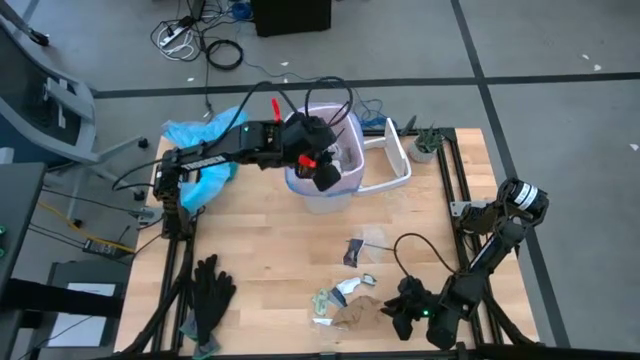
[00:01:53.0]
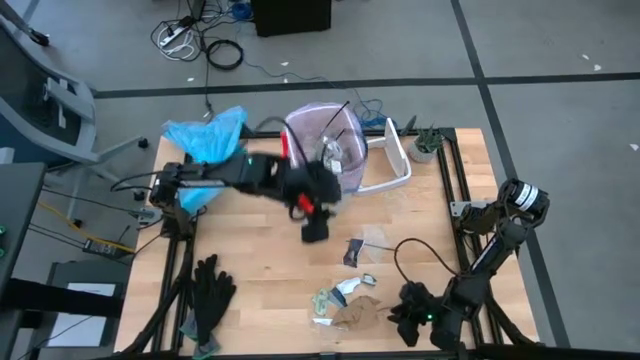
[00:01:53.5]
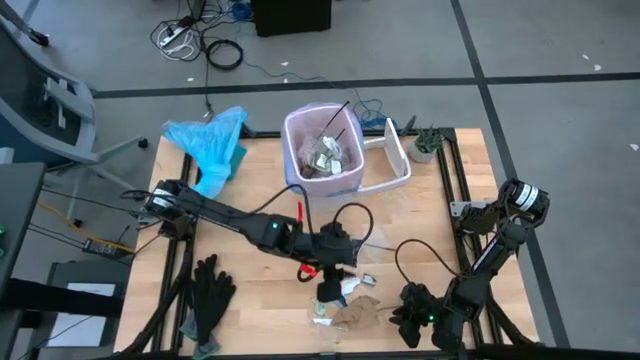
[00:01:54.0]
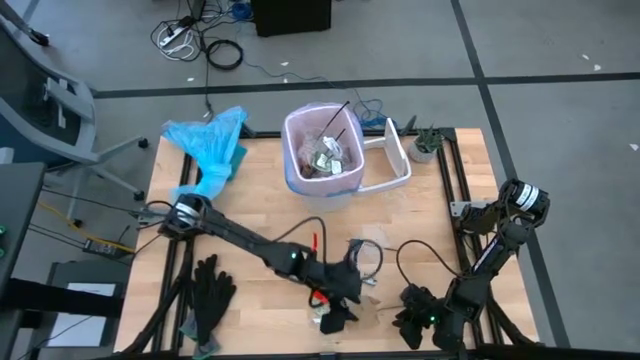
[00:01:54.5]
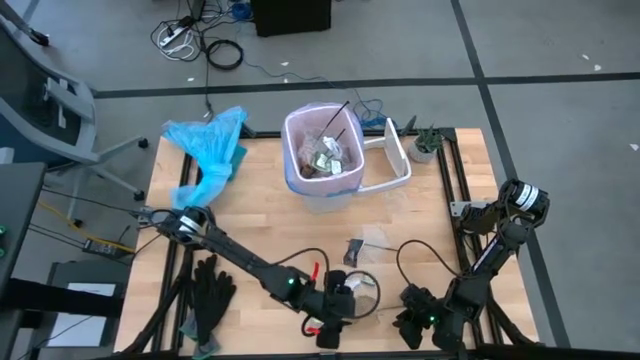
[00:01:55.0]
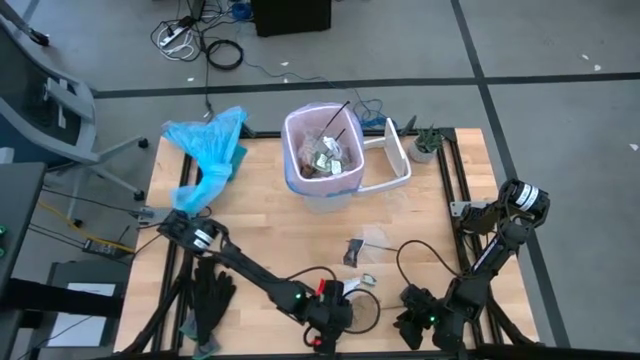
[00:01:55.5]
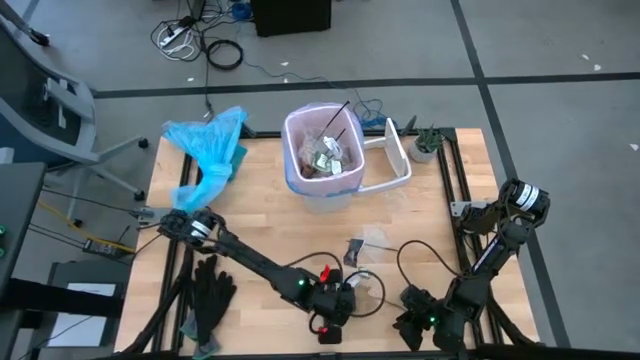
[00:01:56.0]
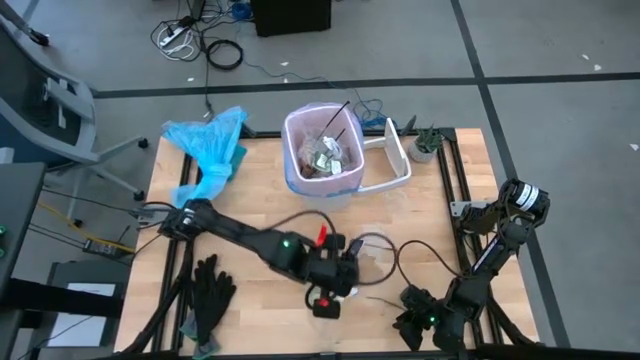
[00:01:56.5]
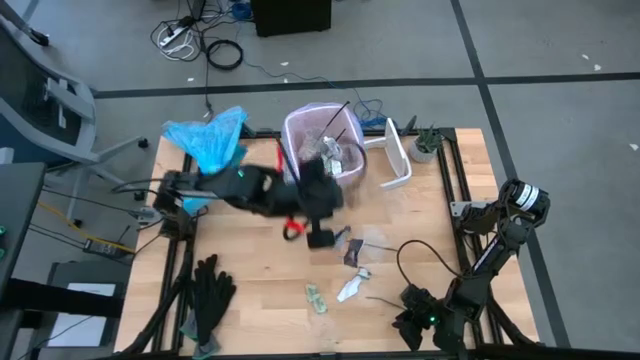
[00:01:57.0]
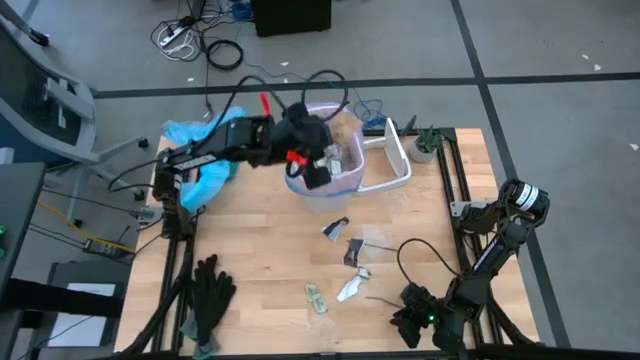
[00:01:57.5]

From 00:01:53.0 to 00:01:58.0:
Task: place trash/remove bag and relplace
Put the brown napkin and blue carton paper into the trash bin

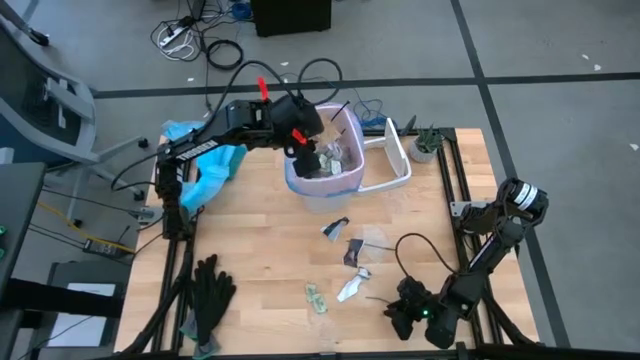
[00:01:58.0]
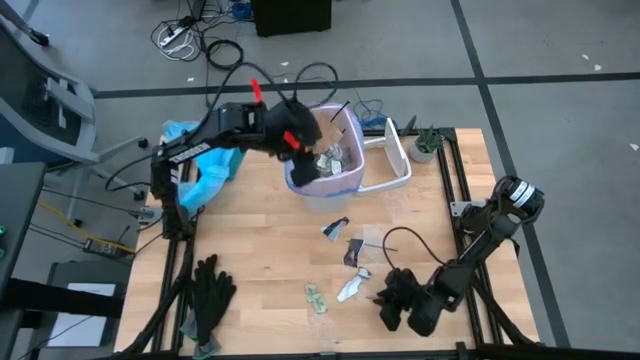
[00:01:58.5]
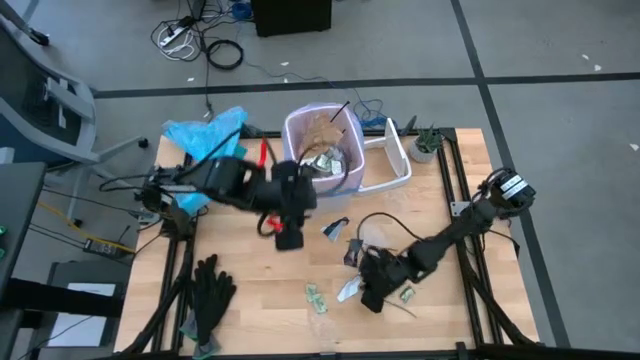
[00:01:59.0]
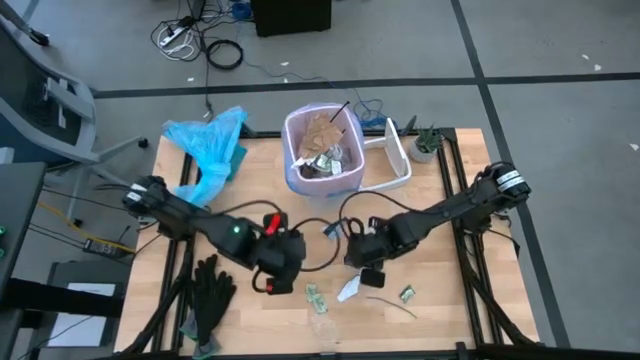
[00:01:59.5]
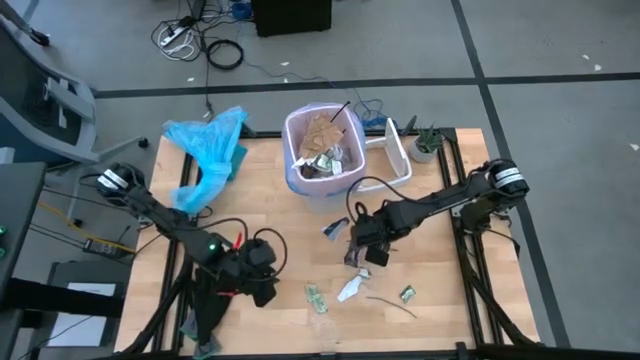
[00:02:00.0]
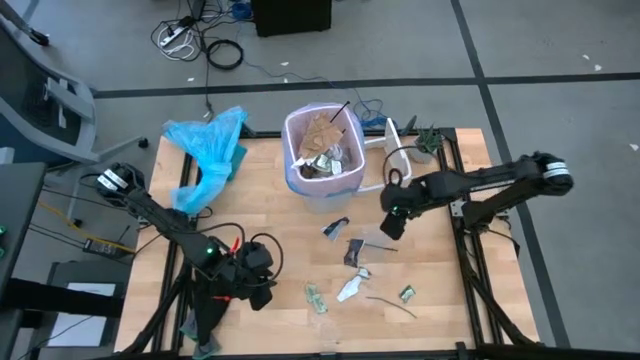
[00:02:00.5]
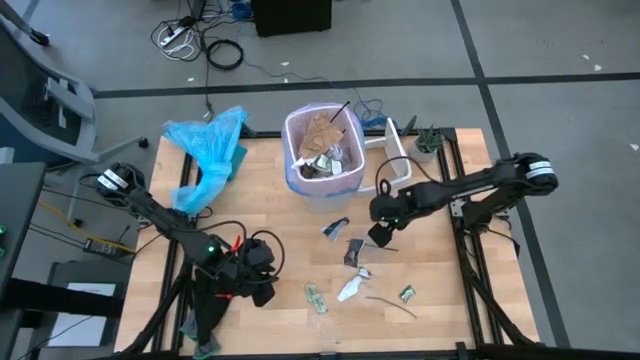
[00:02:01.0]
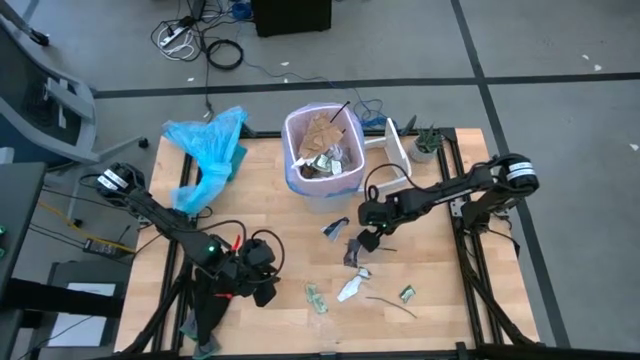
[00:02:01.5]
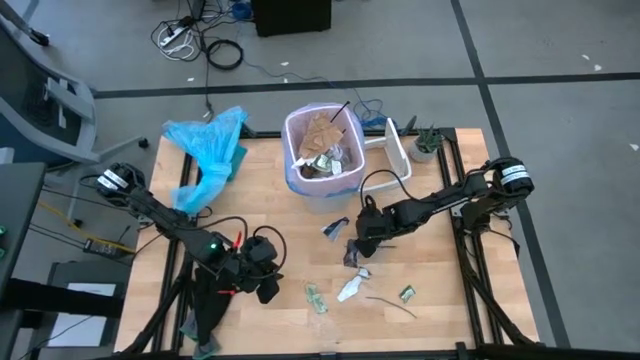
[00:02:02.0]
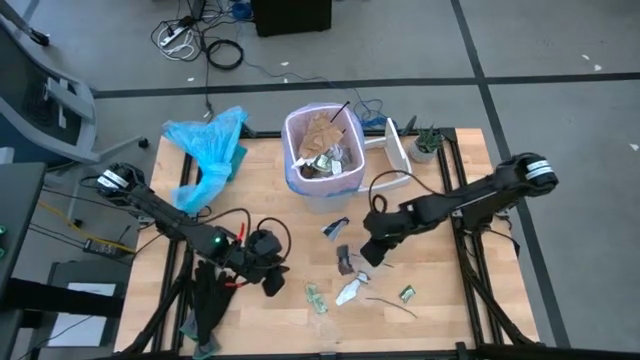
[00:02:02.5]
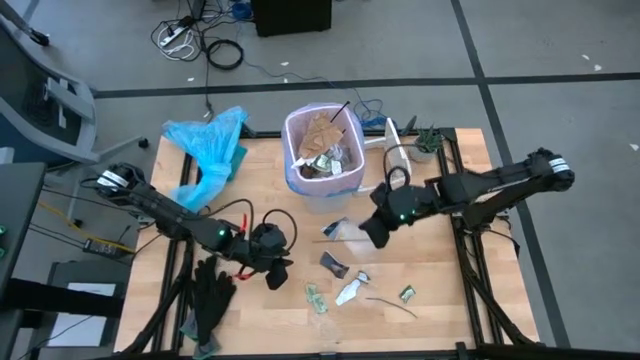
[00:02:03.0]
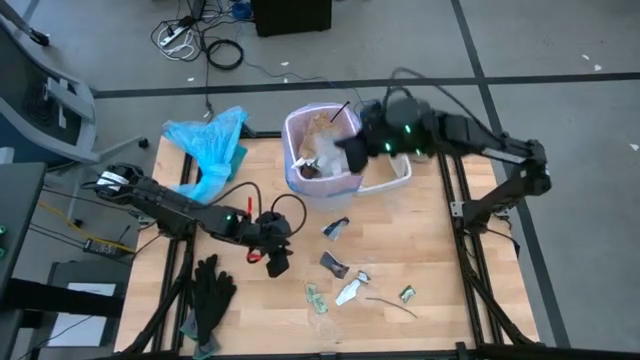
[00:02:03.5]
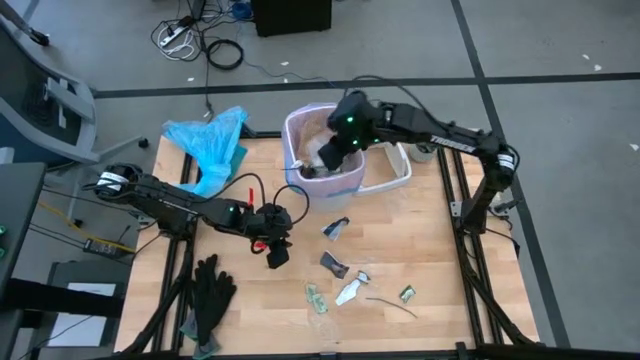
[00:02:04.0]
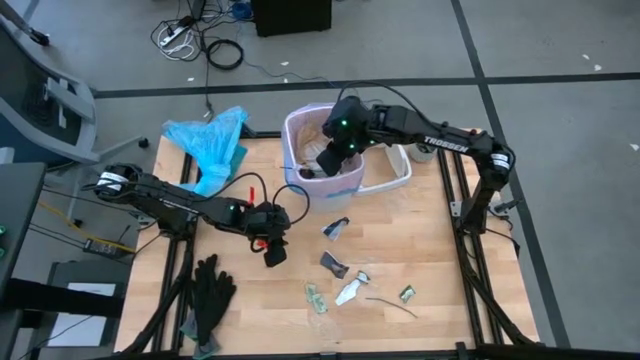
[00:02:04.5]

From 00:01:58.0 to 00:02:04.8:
Put the clear cellophane and top black cable tie into the trash bin

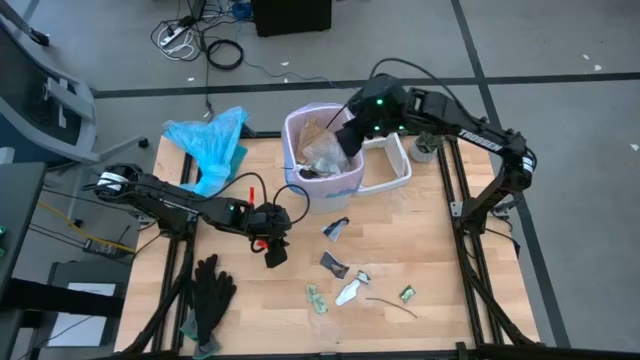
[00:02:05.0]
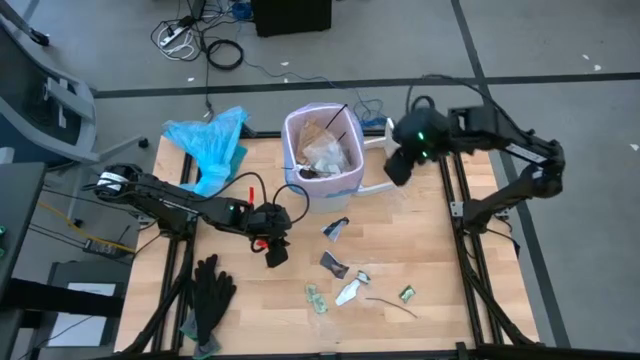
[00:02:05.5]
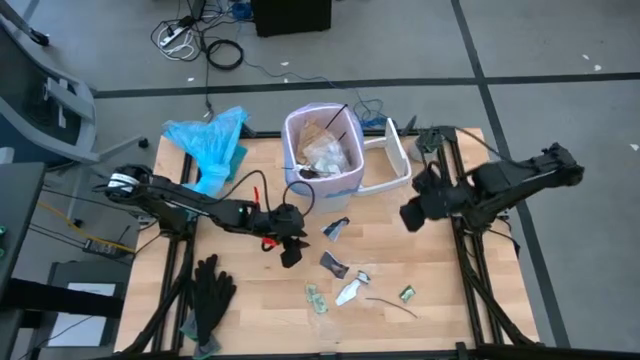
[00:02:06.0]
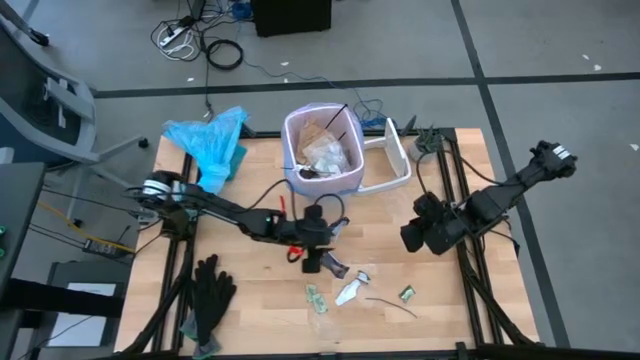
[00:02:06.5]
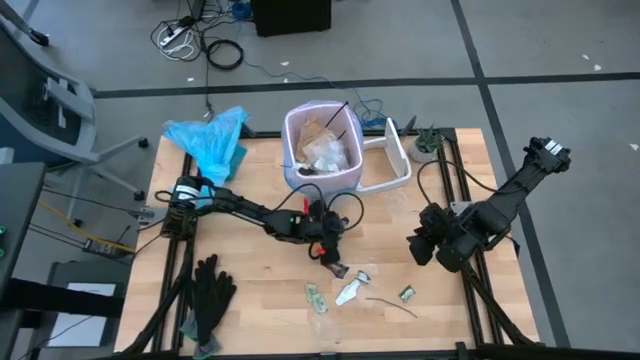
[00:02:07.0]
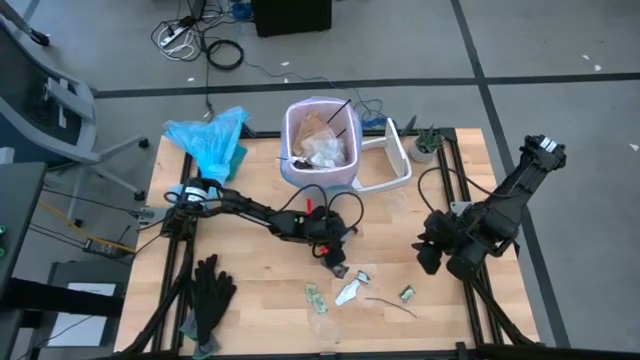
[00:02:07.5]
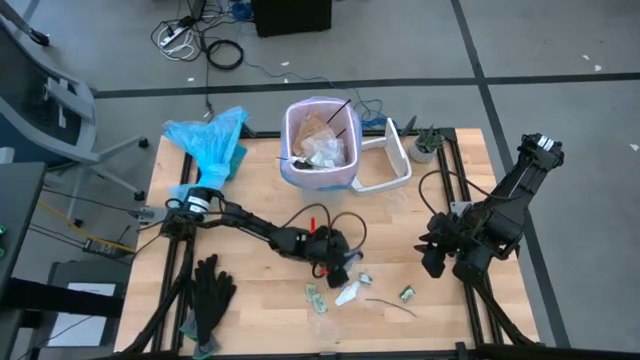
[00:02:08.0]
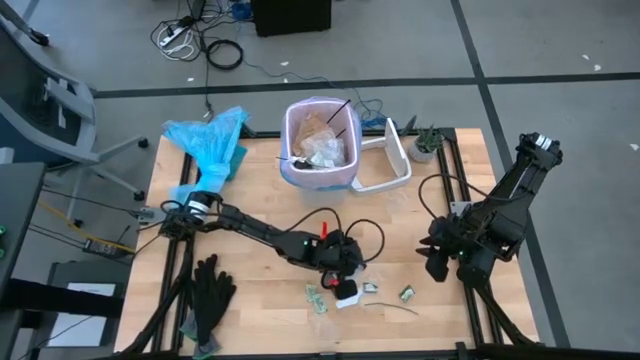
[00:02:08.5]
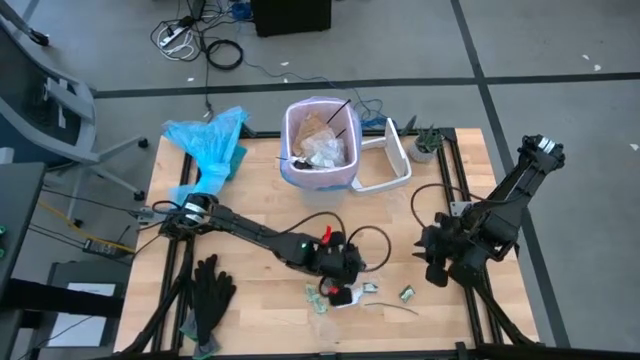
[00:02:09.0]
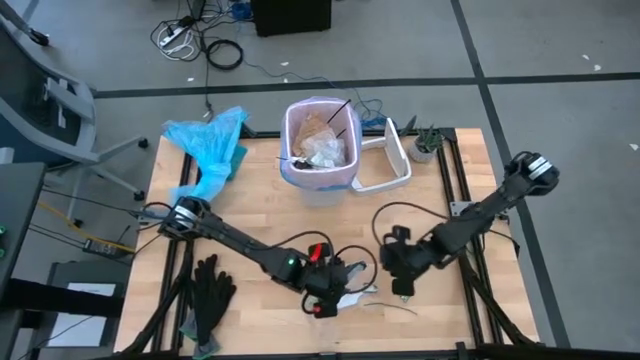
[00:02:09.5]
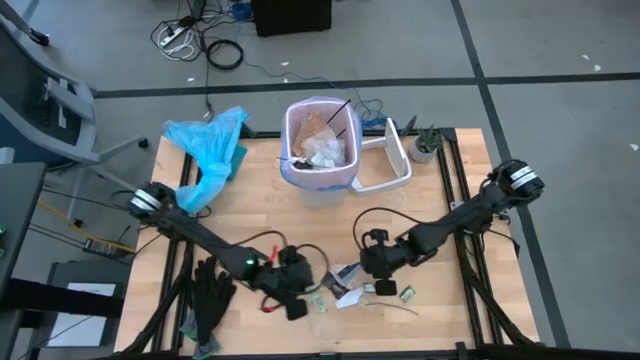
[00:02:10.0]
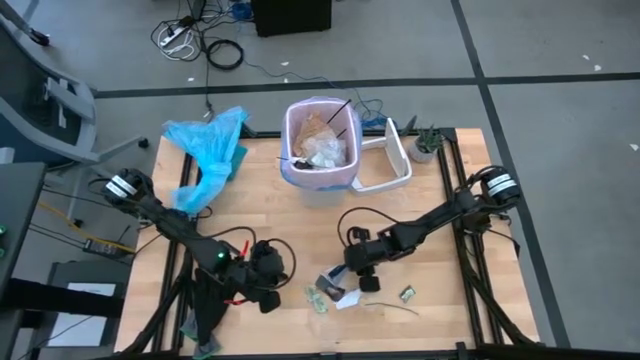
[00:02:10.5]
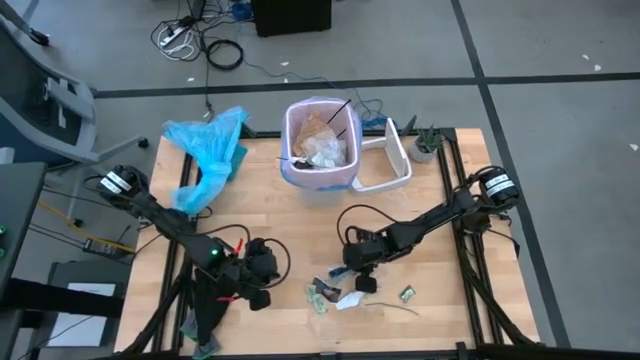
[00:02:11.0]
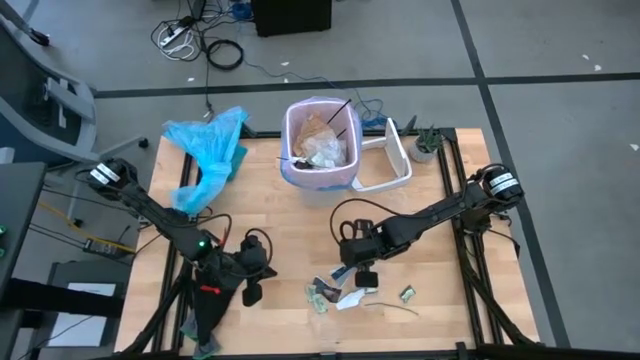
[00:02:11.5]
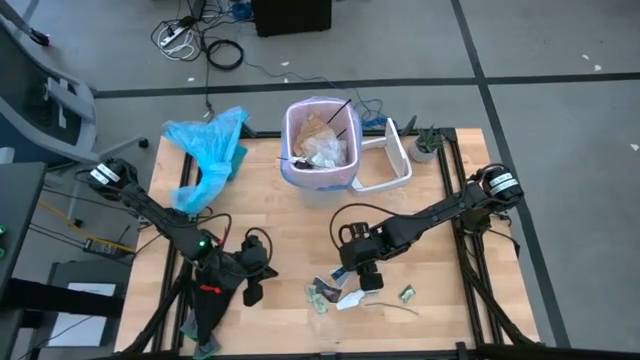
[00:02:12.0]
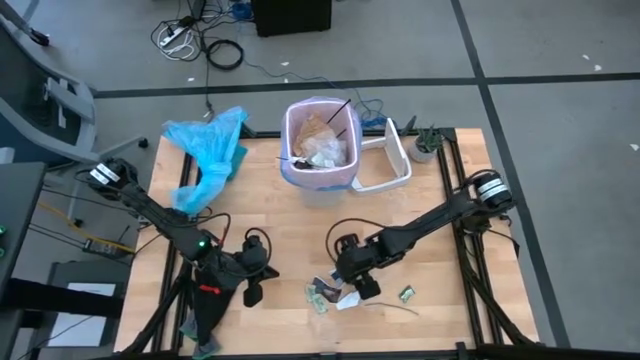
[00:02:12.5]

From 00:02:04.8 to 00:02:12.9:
Put the black paper into the trash bin

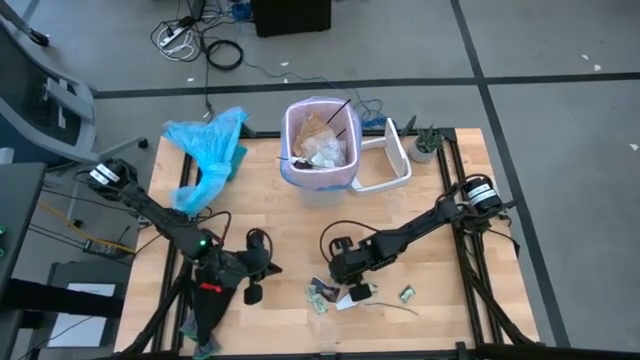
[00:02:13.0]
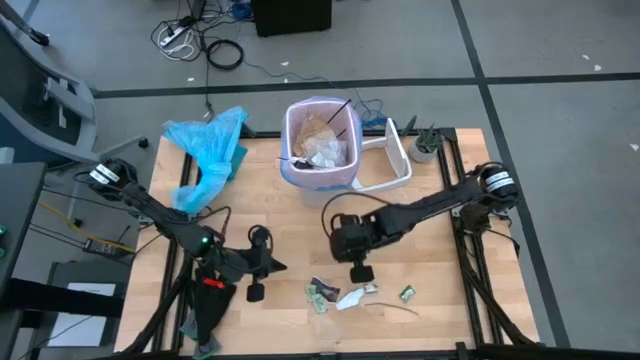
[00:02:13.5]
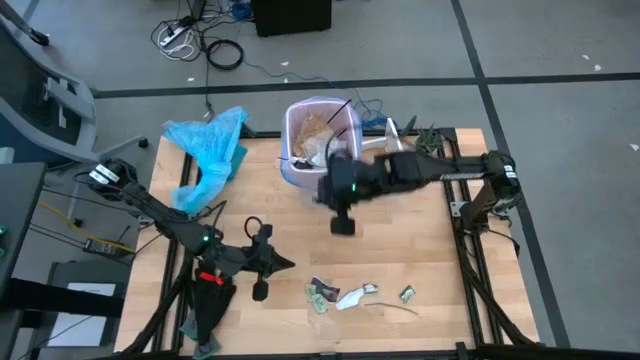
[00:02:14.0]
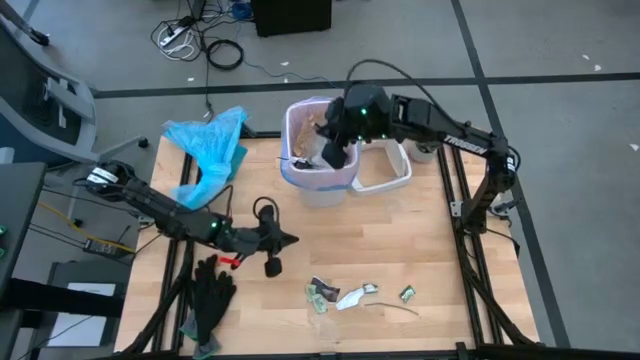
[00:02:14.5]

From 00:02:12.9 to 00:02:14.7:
Put the black paper into the trash bin
